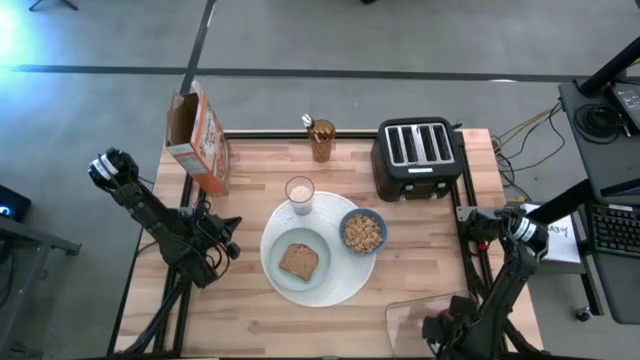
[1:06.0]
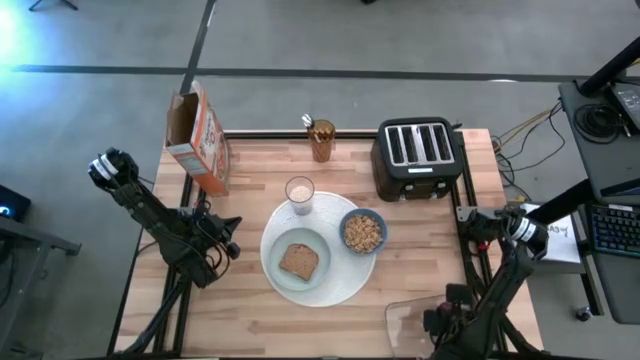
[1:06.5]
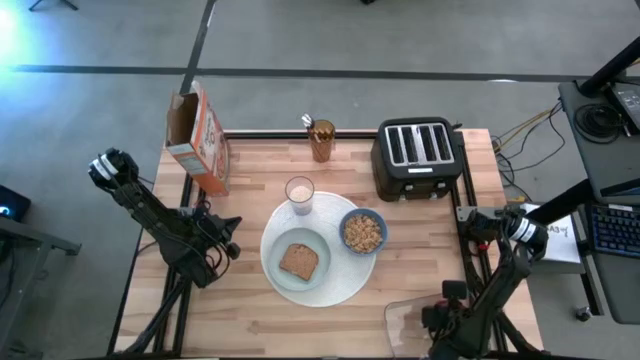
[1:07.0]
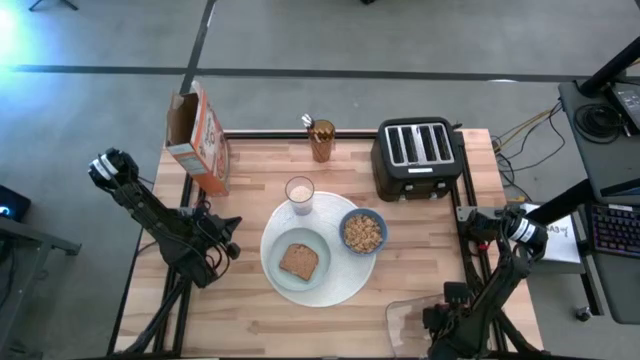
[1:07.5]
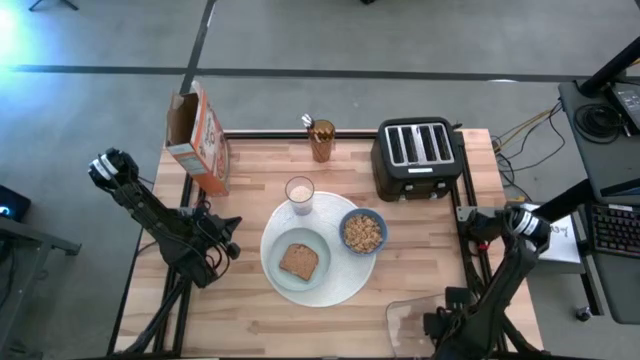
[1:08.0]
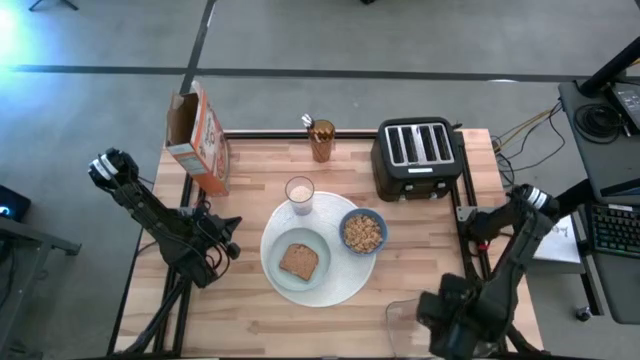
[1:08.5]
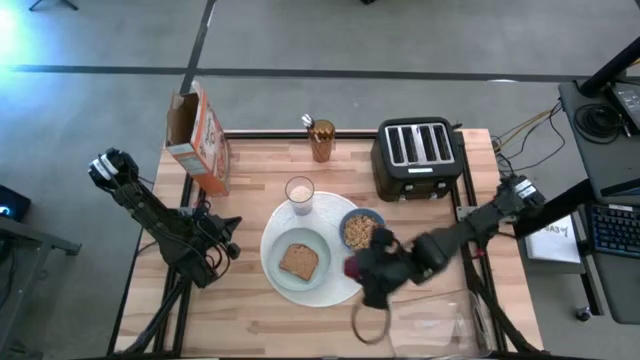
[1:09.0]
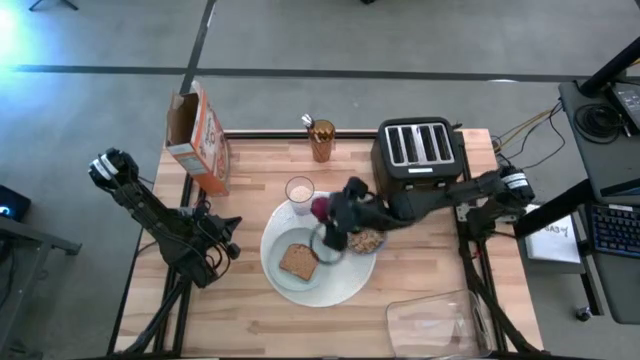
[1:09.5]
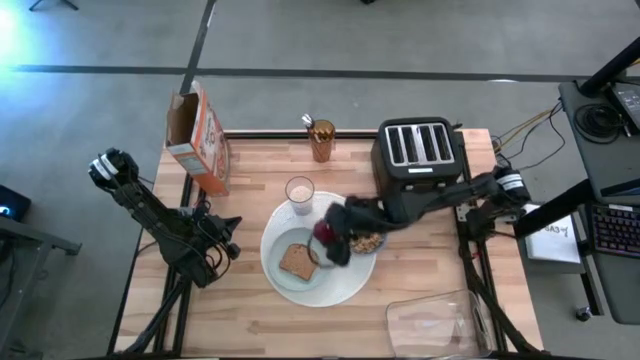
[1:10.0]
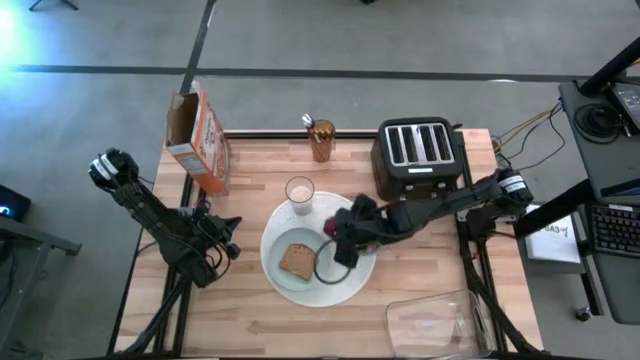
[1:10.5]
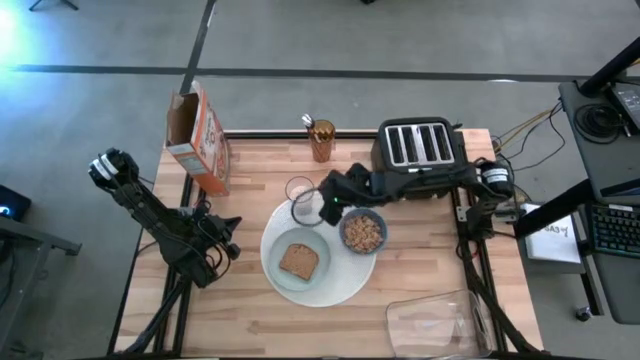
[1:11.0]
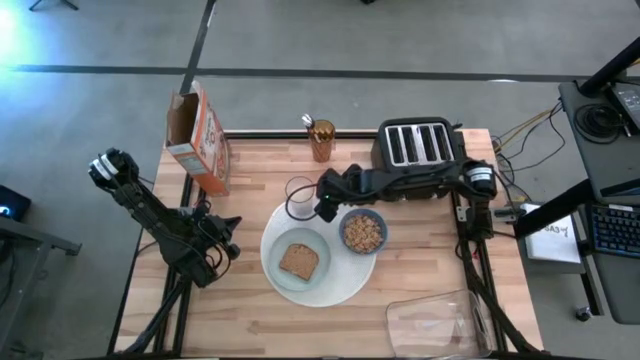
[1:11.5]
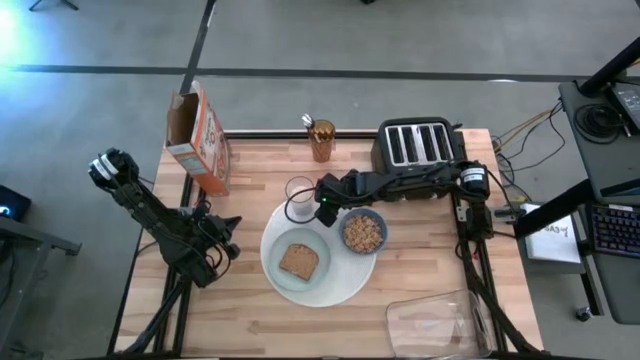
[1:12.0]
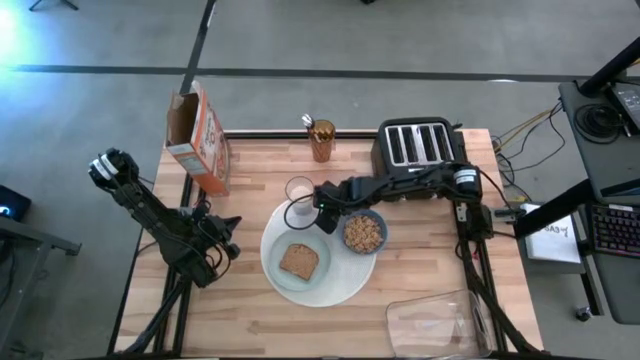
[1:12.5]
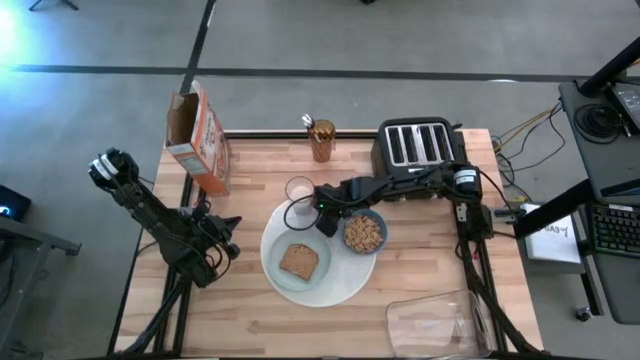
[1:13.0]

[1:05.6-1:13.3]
Task: Arrange a breakfast setting
Put the apple on the placemat

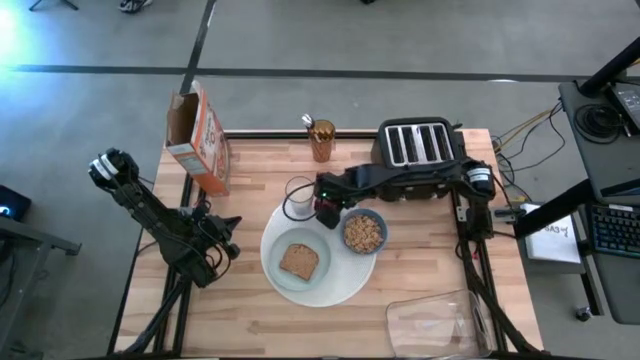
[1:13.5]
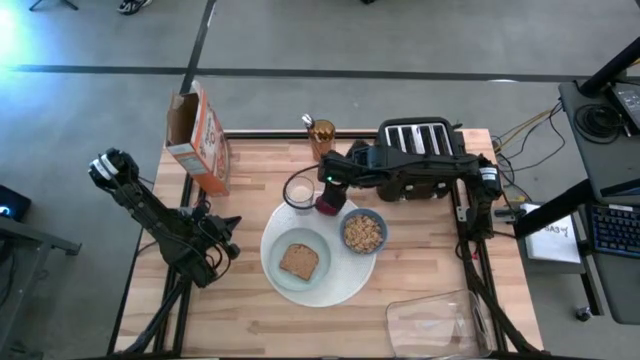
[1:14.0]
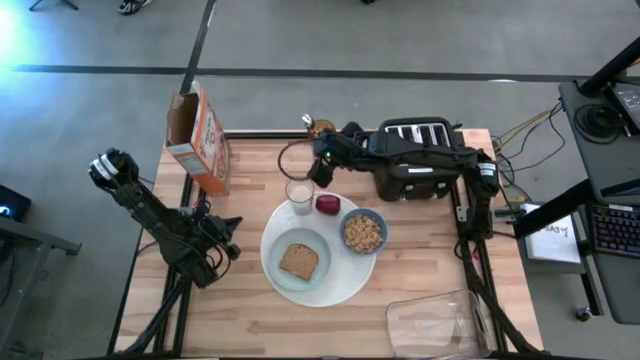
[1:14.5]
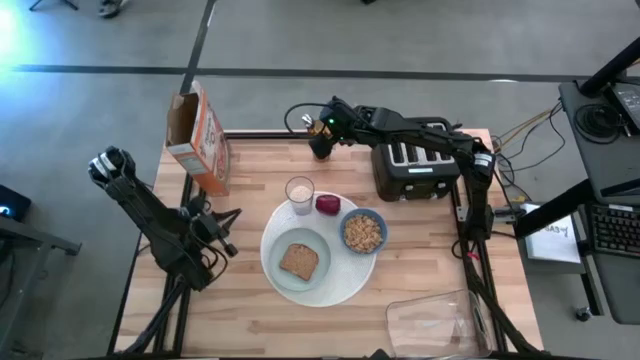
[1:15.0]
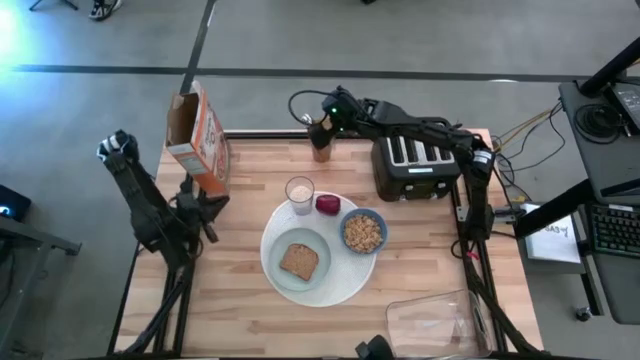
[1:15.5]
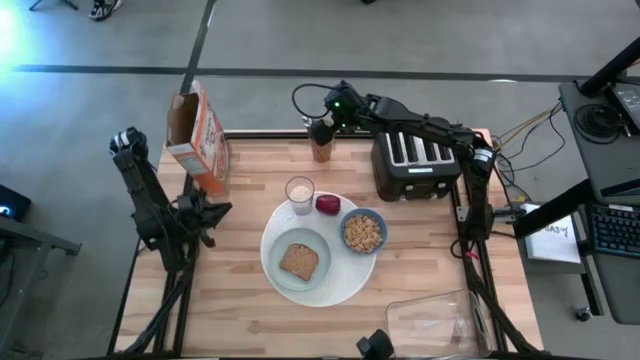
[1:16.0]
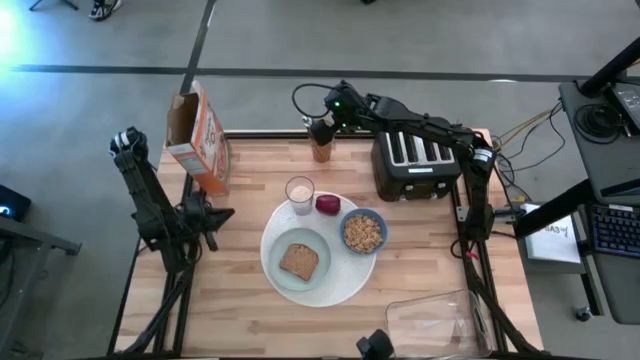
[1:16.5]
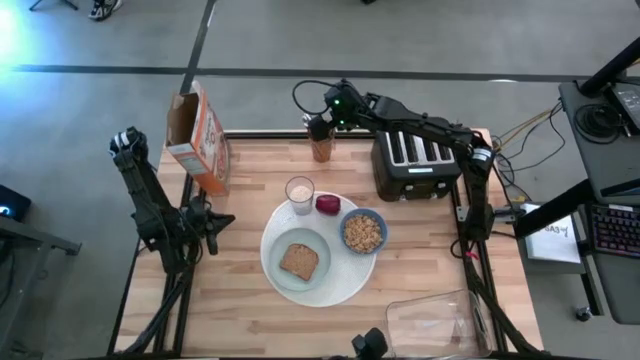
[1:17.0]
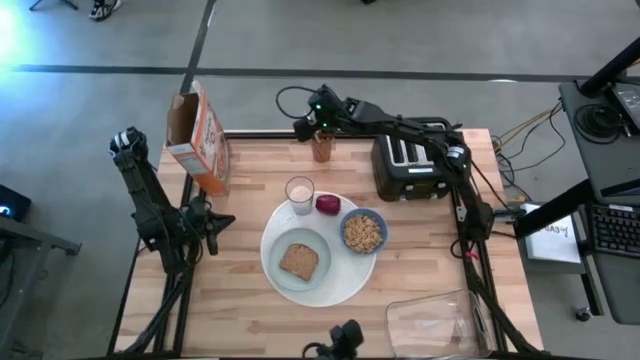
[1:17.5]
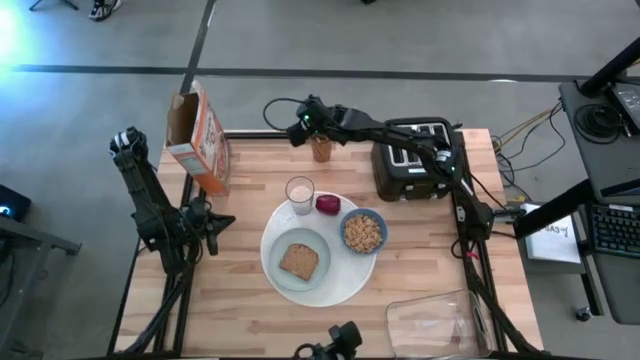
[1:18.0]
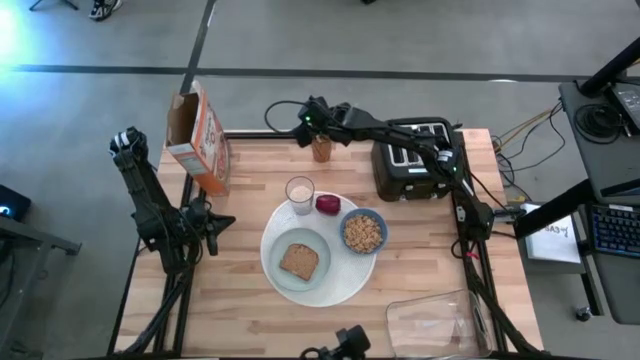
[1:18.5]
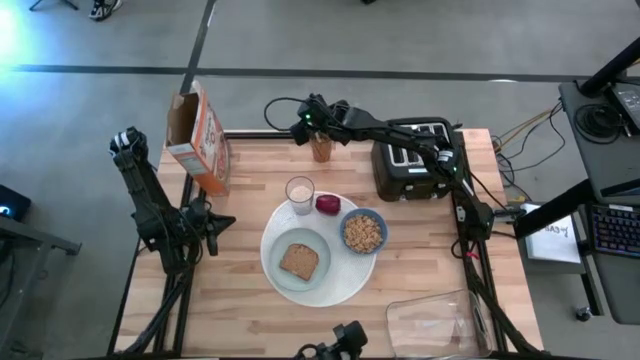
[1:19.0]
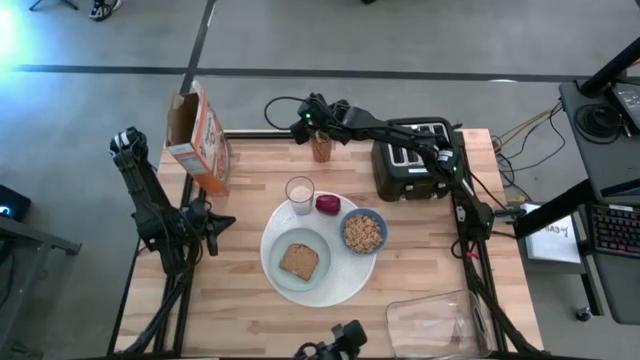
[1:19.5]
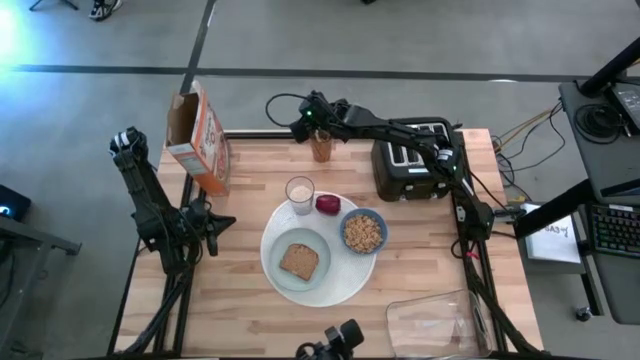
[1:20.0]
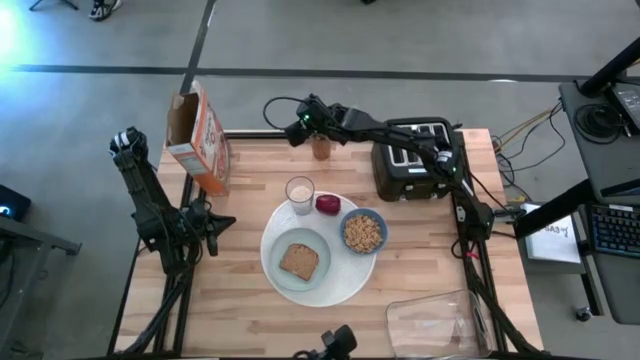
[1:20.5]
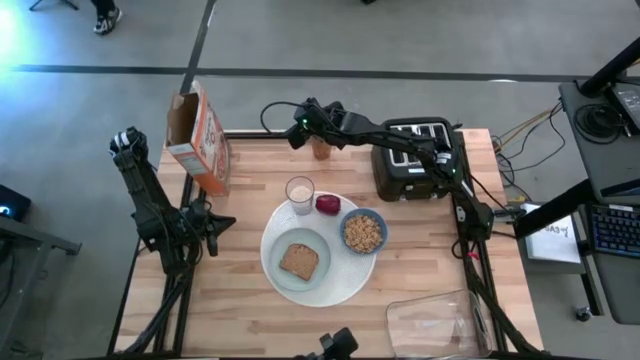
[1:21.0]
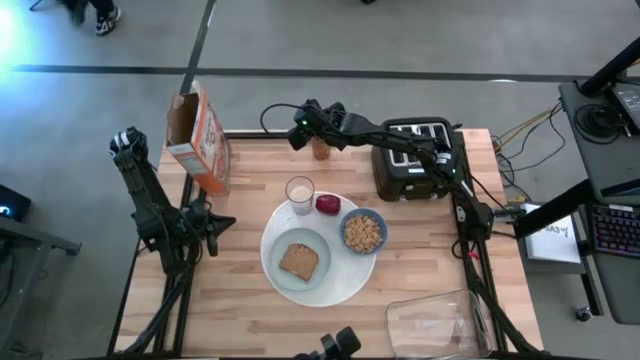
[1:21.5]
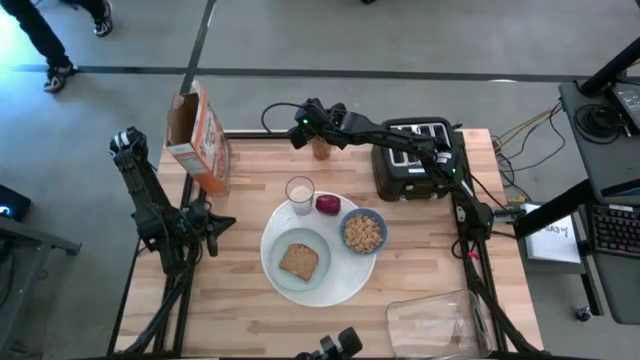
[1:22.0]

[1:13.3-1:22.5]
Put the spoon on the placemat

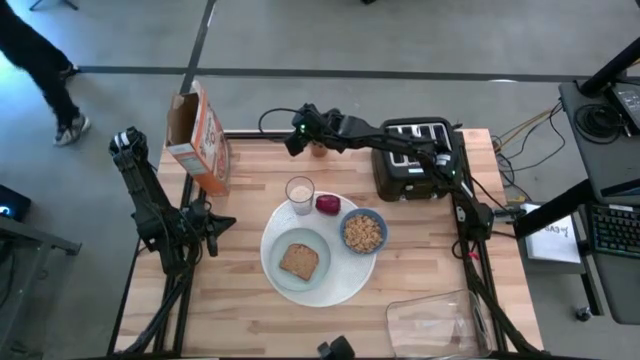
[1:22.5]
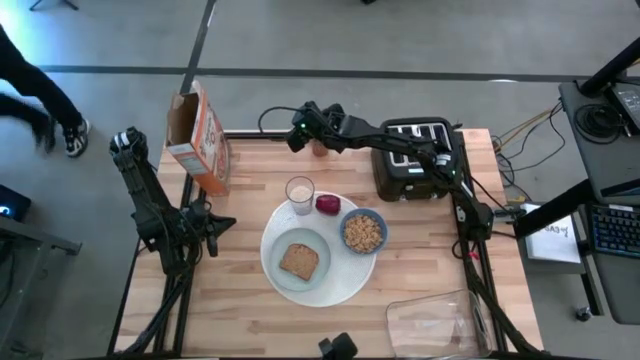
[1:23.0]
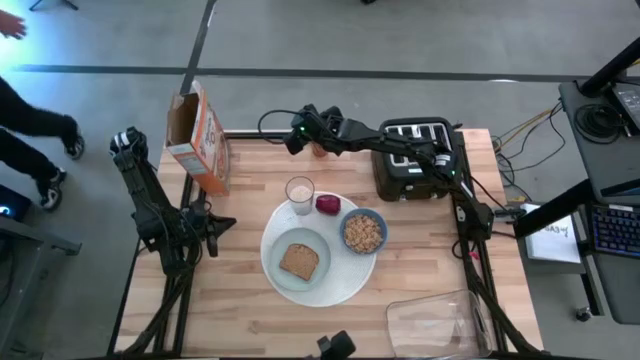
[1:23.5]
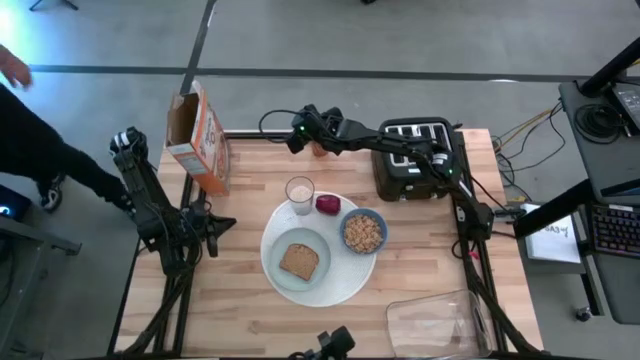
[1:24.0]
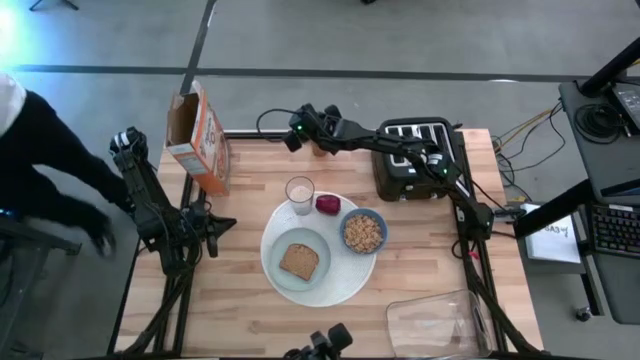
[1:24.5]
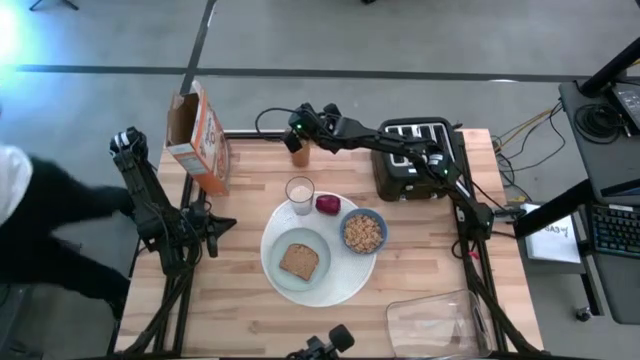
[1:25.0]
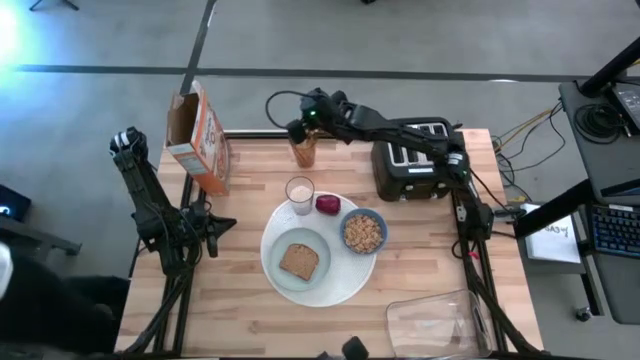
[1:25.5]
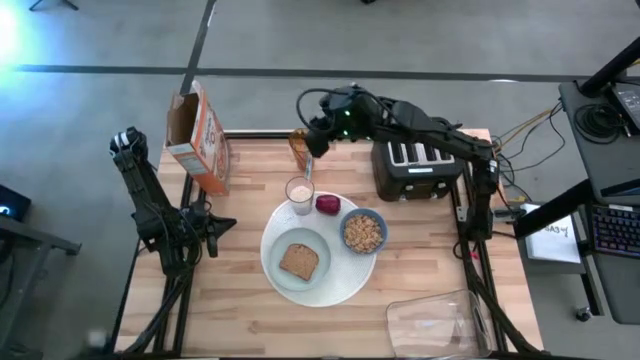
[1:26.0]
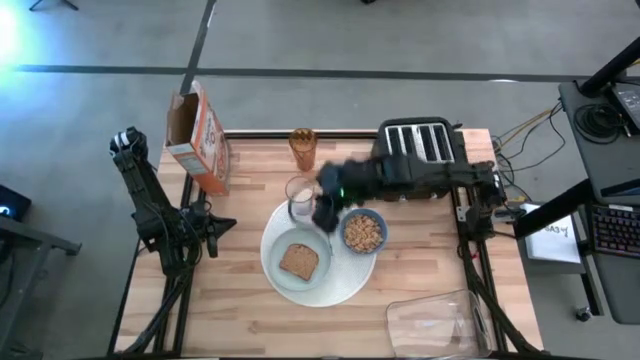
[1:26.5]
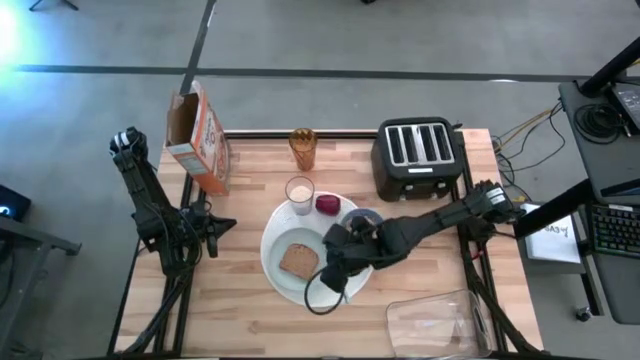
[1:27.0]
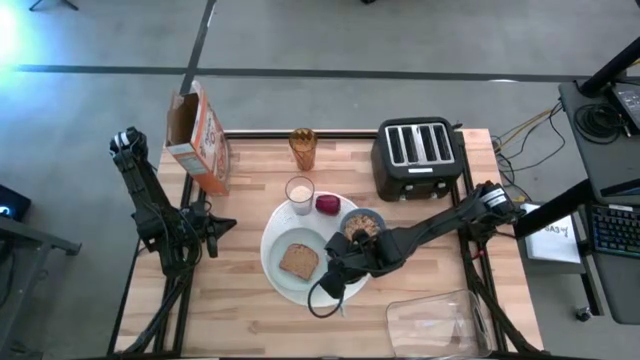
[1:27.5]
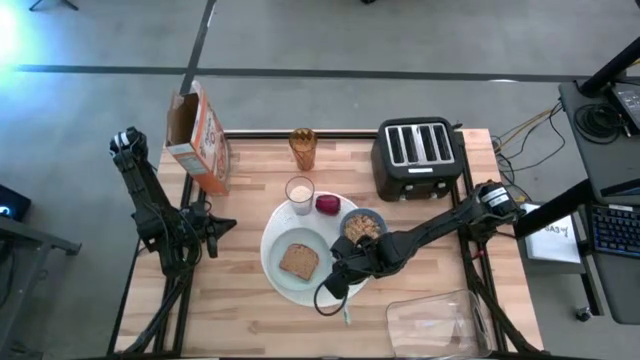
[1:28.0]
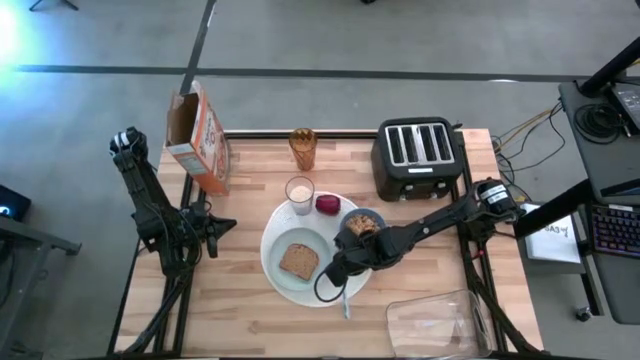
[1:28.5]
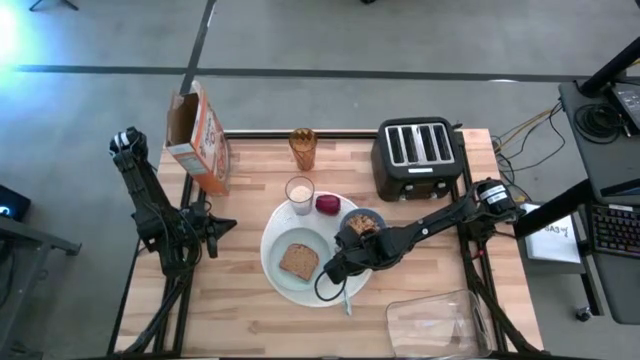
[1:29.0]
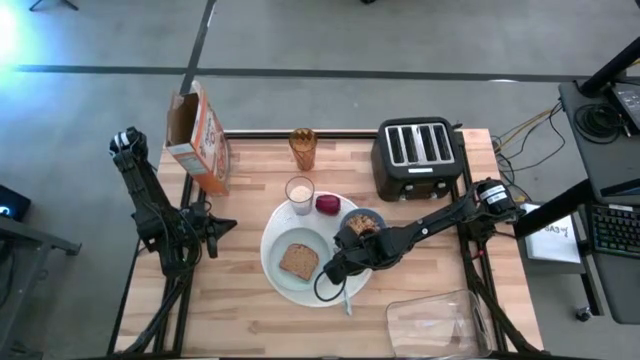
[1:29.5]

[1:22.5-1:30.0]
Put the spoon on the placemat
